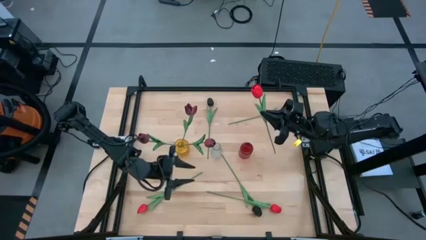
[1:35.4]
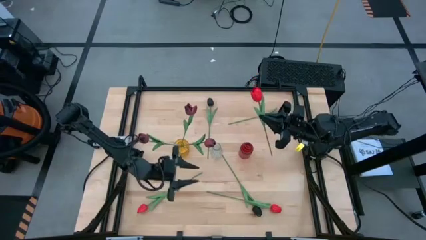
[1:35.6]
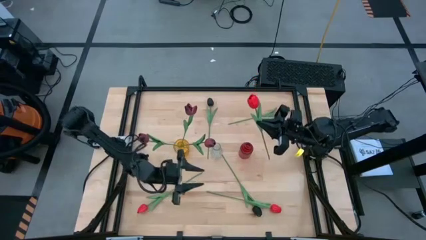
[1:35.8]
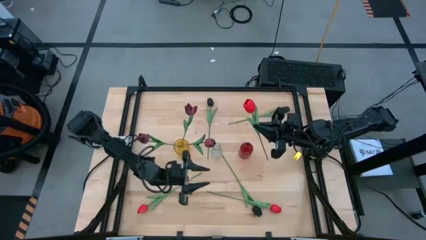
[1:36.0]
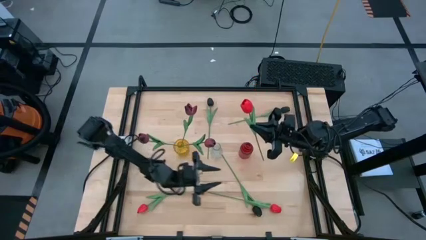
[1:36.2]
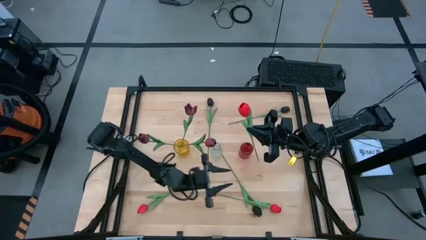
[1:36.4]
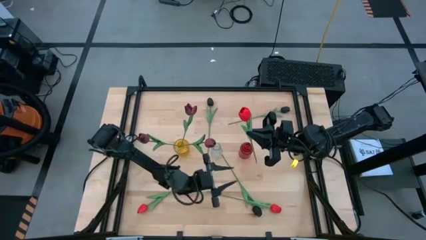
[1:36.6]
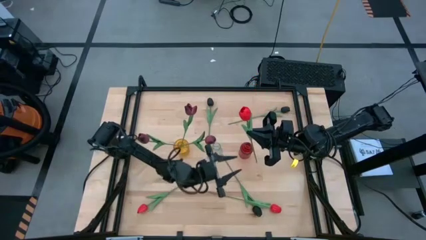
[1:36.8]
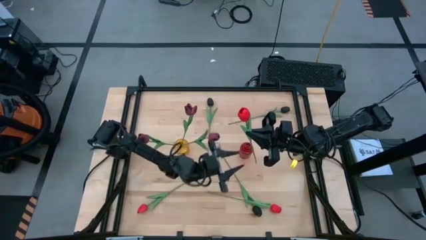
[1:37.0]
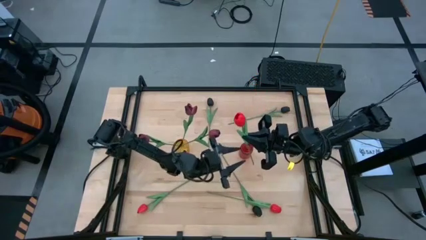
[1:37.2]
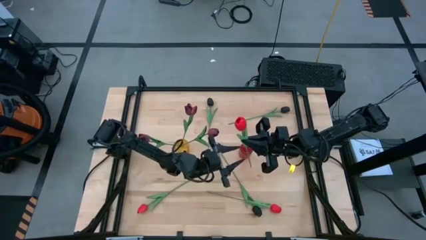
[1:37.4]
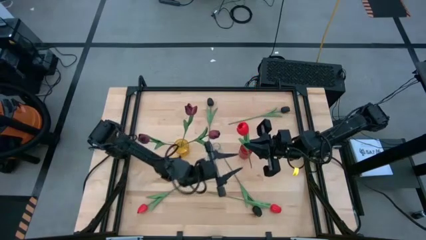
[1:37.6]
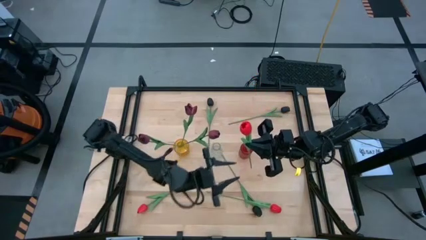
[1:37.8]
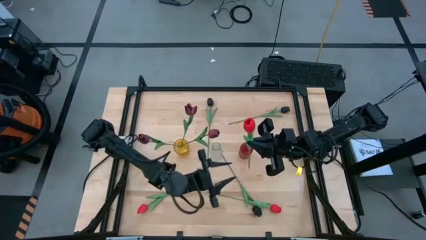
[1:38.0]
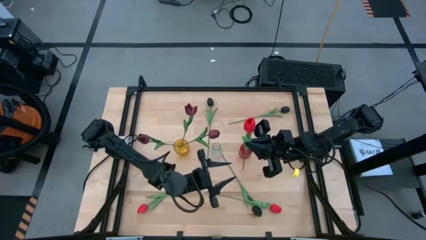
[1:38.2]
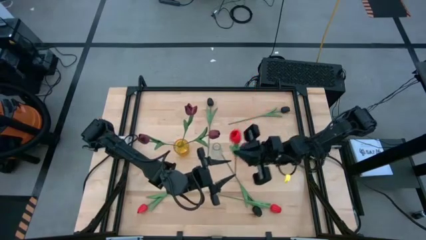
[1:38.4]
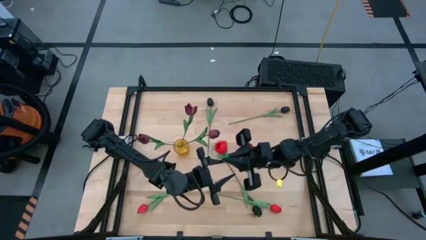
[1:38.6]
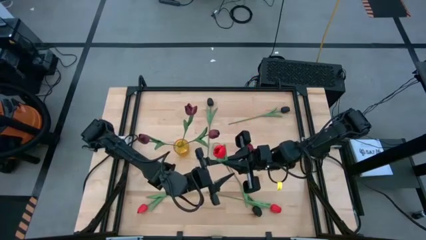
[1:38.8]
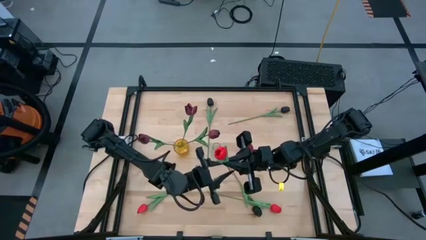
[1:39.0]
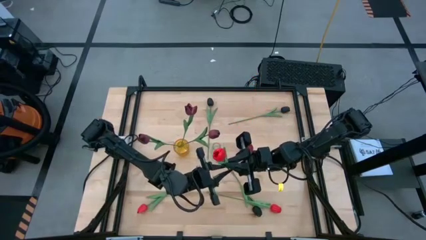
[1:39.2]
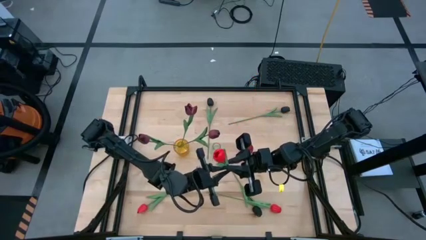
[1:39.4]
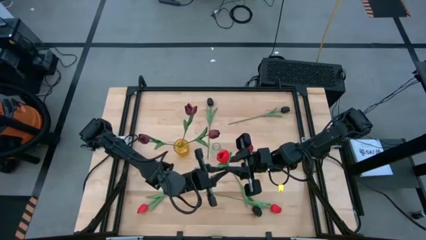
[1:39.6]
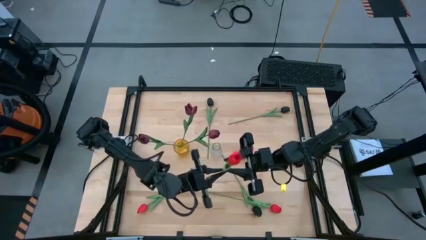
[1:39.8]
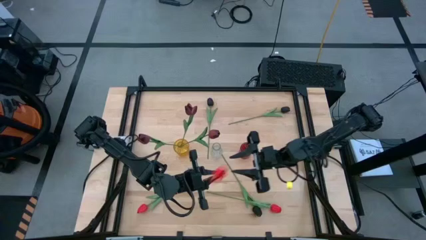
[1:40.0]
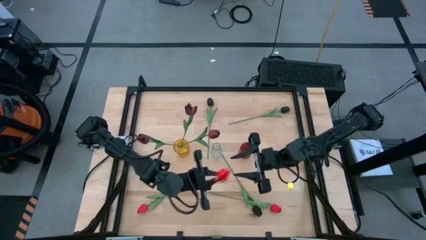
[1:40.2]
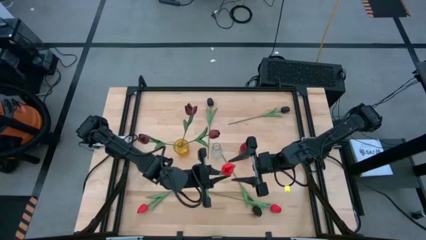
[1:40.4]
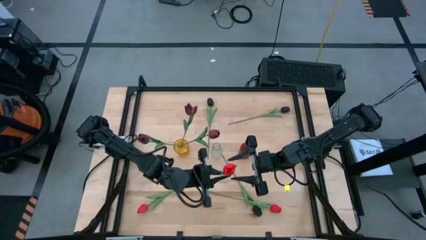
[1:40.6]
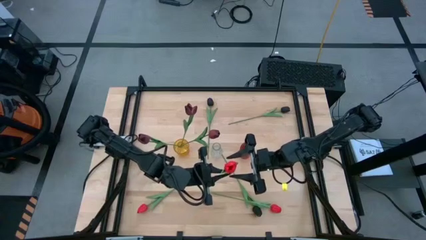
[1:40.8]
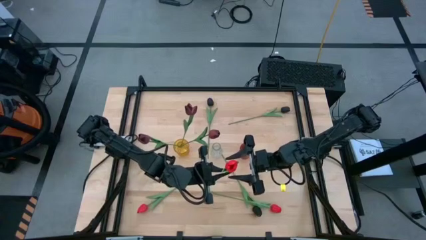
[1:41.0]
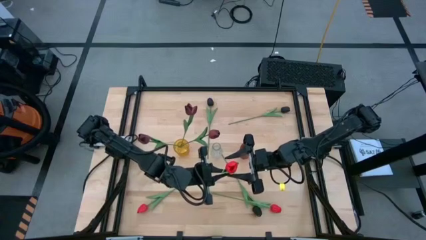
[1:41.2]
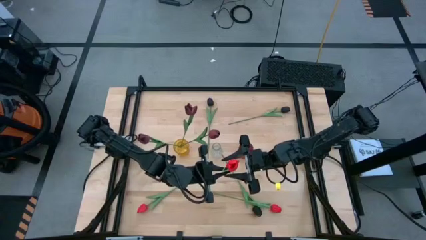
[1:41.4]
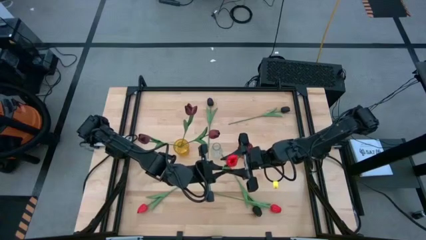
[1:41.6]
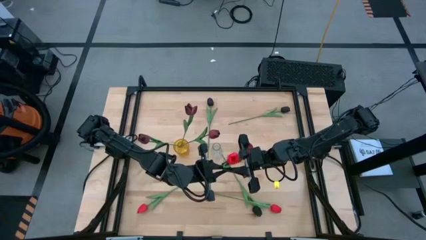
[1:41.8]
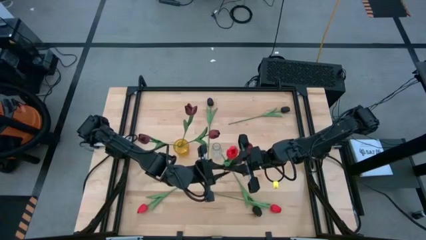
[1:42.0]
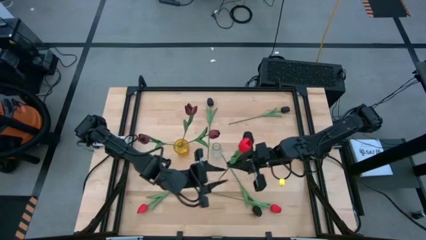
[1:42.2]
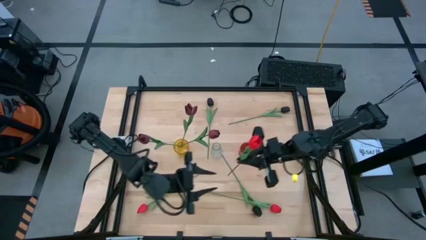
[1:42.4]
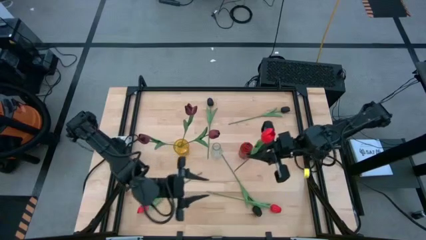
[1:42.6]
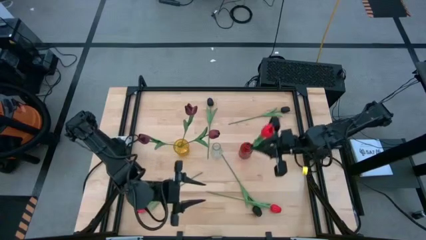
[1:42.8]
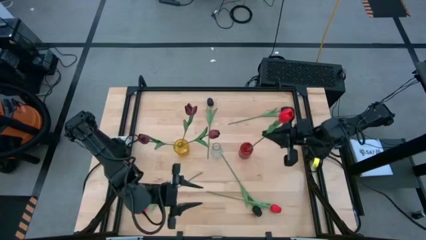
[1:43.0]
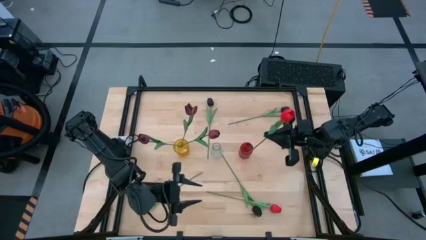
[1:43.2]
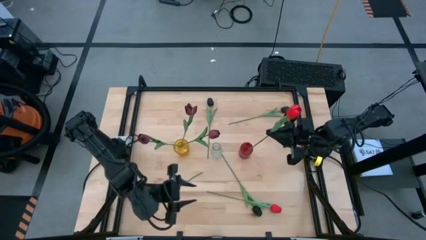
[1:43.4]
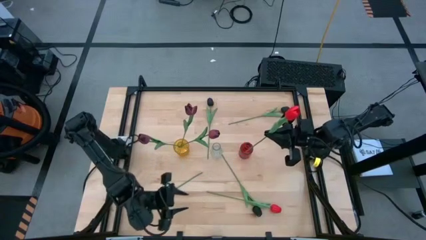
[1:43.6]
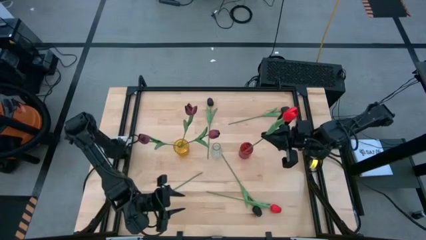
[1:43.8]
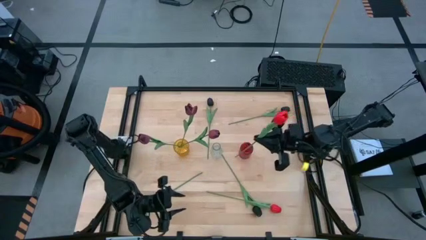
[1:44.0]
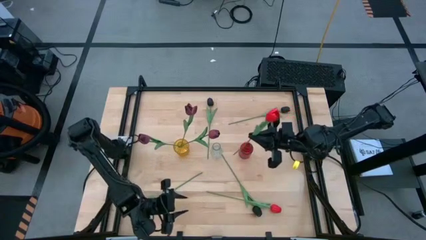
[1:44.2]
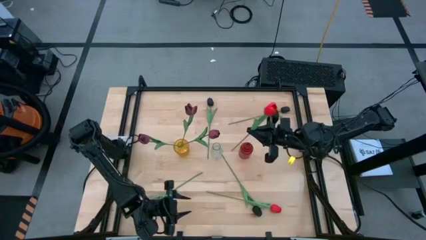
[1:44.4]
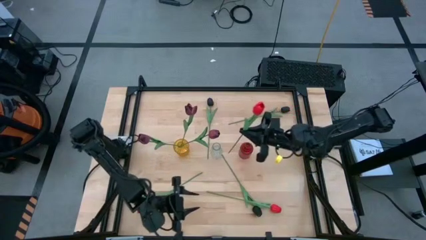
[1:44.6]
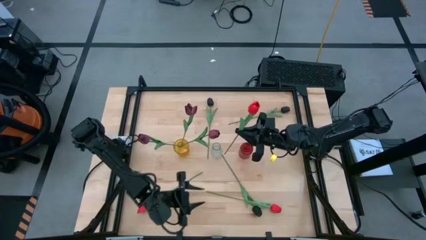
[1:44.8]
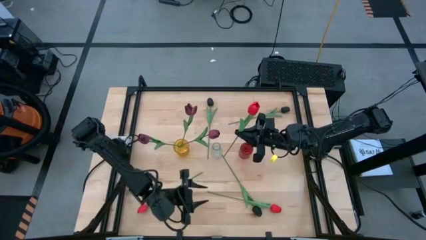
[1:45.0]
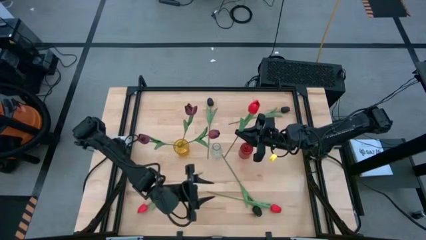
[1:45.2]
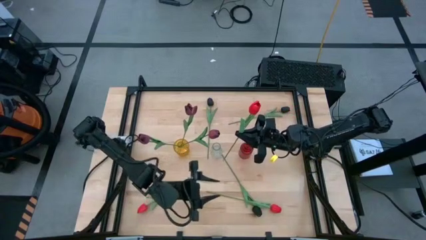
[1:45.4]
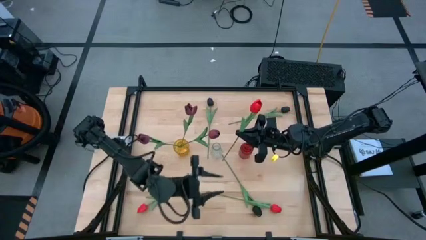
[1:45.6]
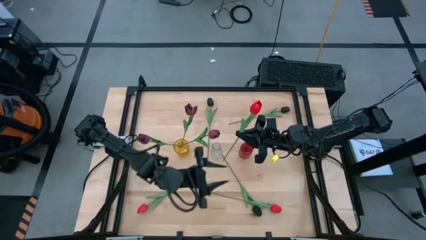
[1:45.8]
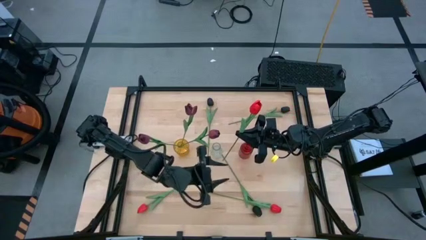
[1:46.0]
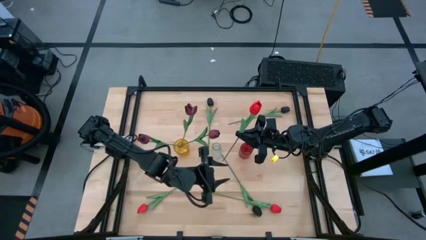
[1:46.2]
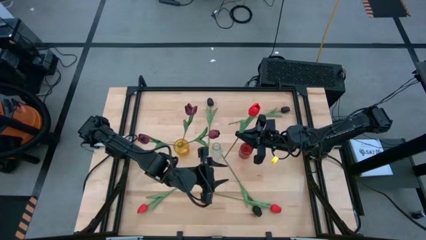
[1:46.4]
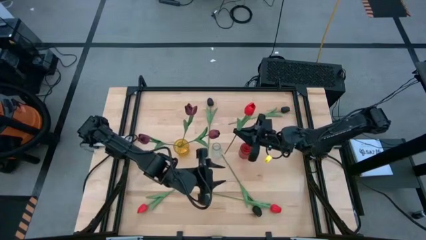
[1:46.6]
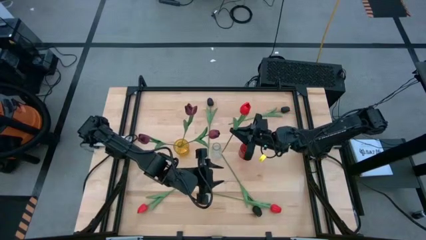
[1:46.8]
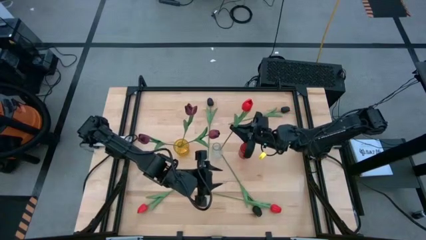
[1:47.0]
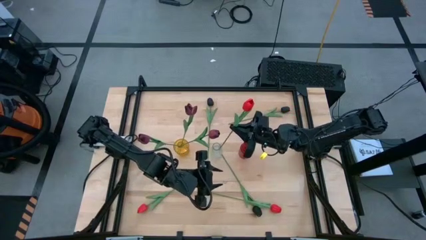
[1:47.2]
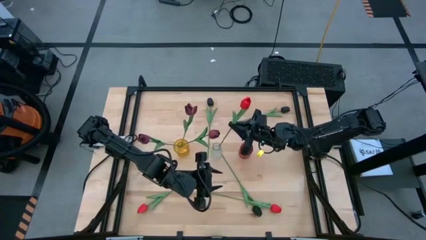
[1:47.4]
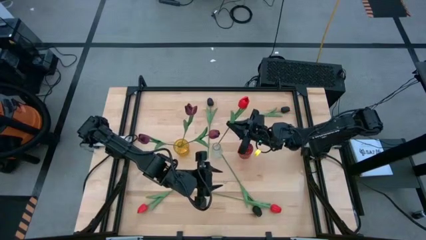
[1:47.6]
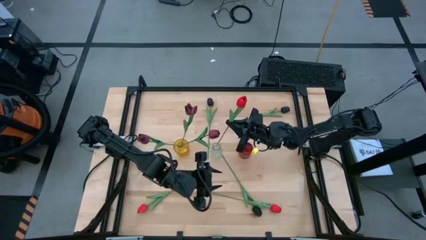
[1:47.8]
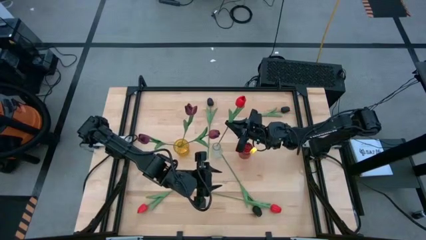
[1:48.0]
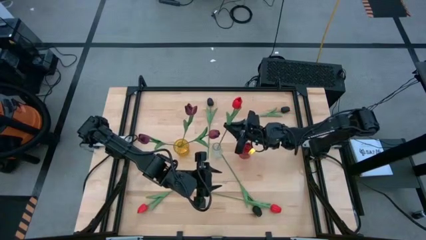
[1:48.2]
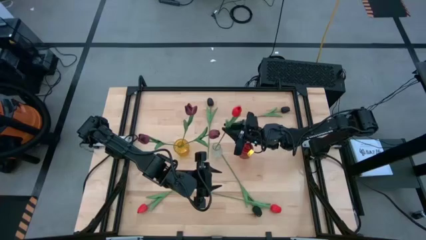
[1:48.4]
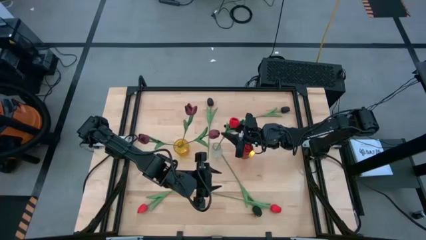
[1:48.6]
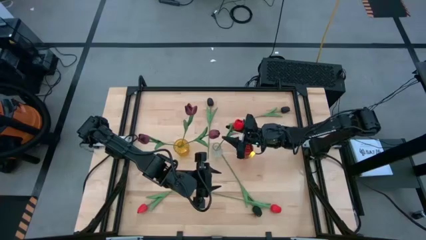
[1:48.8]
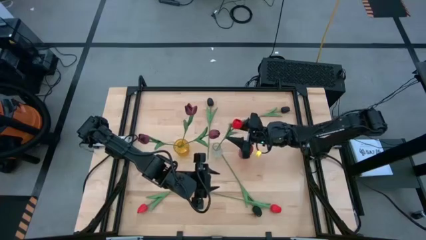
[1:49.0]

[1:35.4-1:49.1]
Task: Sort flowers into vase by color
Put the top pink tulip into the transparent vase
